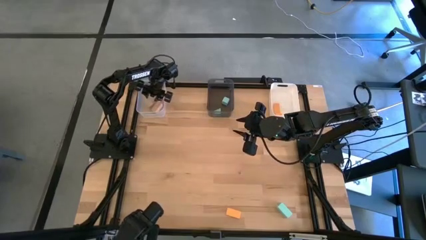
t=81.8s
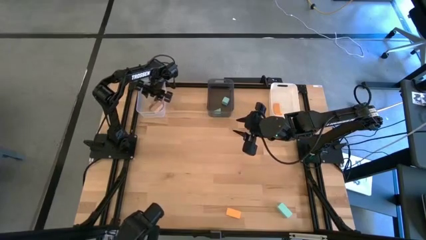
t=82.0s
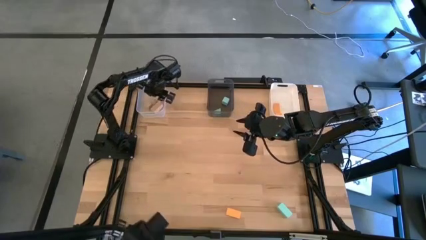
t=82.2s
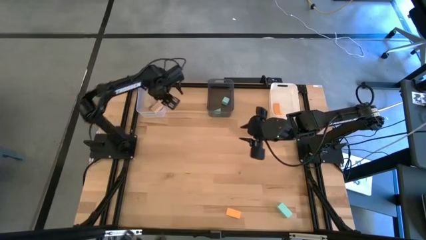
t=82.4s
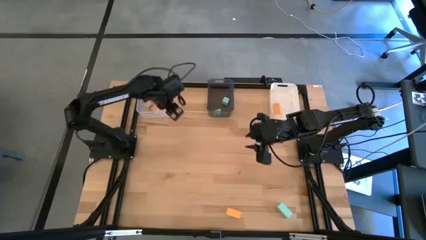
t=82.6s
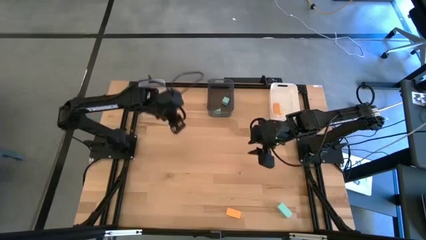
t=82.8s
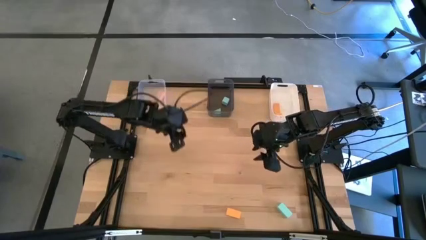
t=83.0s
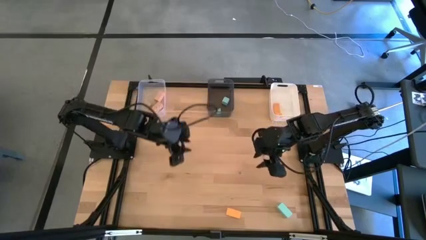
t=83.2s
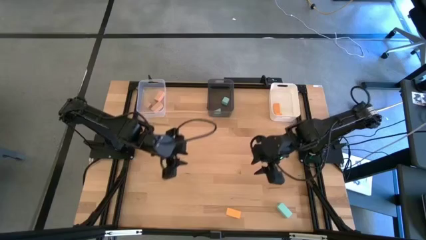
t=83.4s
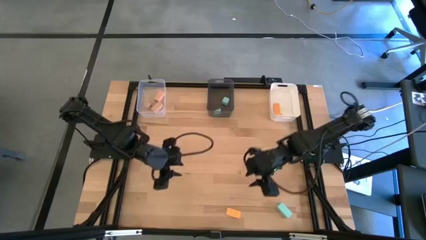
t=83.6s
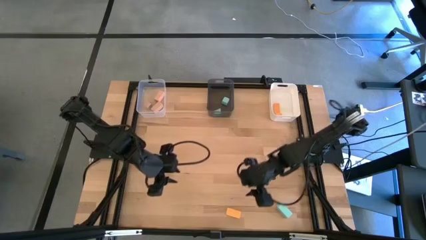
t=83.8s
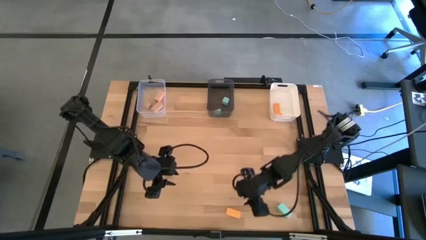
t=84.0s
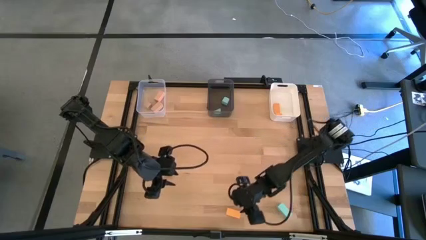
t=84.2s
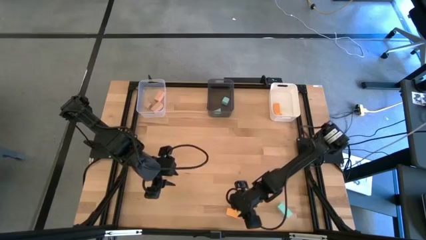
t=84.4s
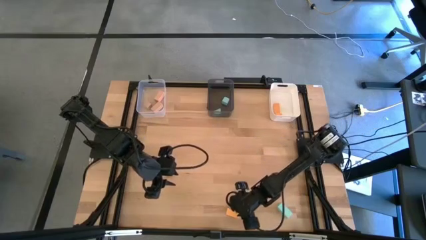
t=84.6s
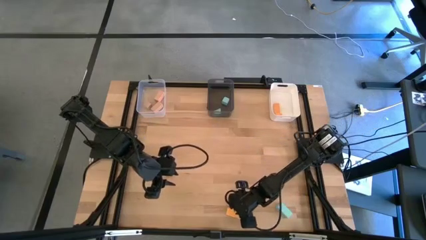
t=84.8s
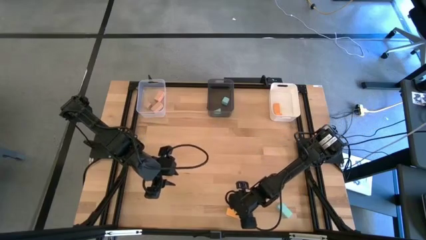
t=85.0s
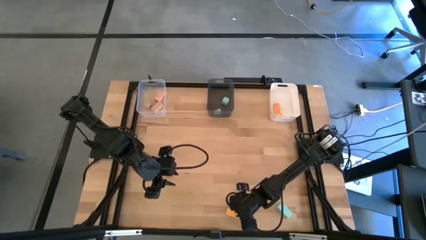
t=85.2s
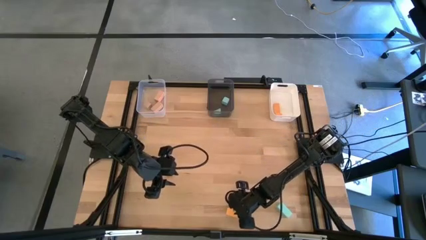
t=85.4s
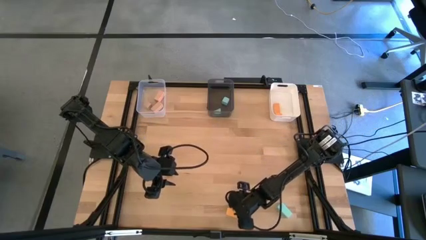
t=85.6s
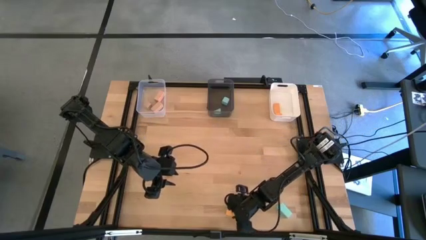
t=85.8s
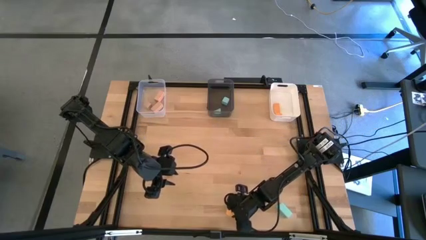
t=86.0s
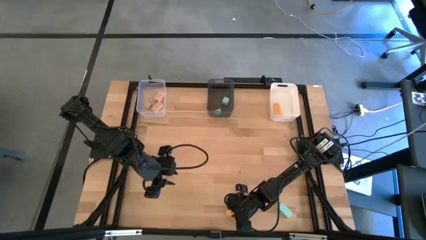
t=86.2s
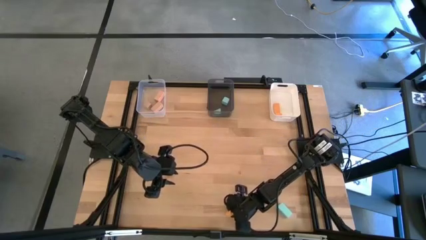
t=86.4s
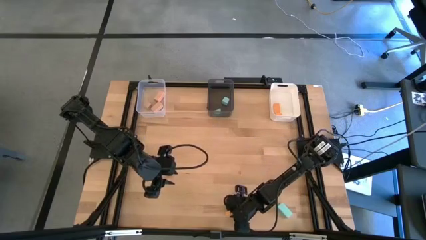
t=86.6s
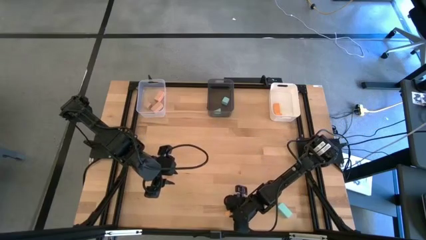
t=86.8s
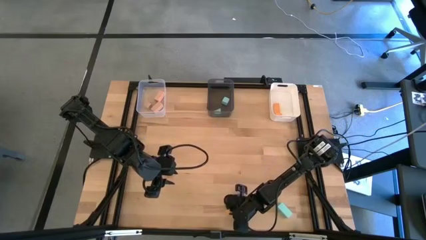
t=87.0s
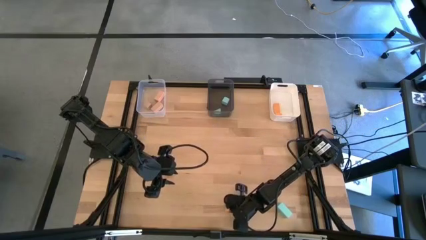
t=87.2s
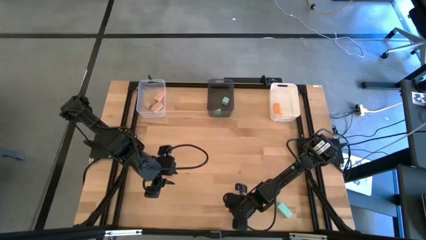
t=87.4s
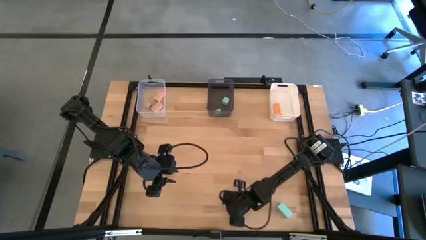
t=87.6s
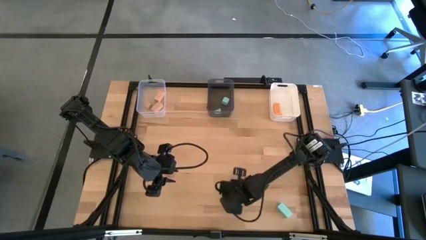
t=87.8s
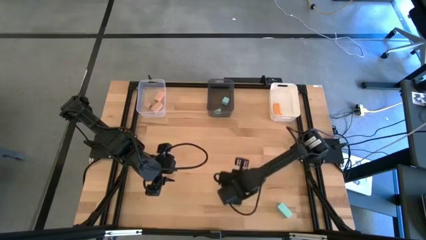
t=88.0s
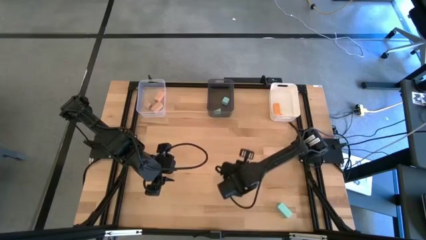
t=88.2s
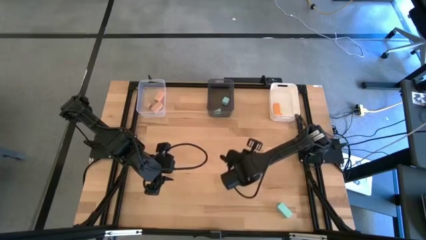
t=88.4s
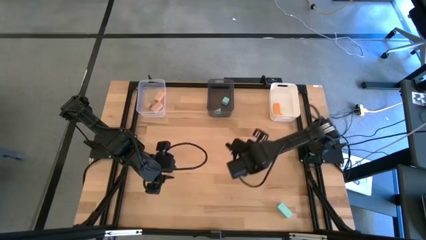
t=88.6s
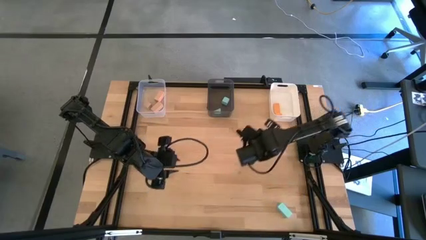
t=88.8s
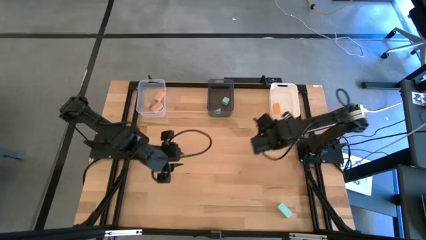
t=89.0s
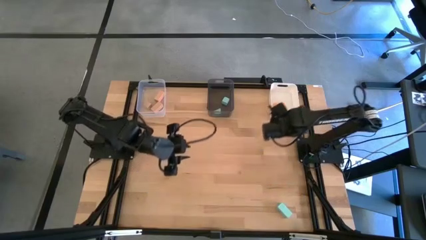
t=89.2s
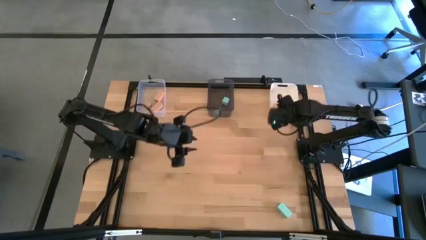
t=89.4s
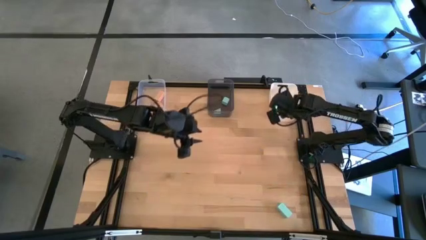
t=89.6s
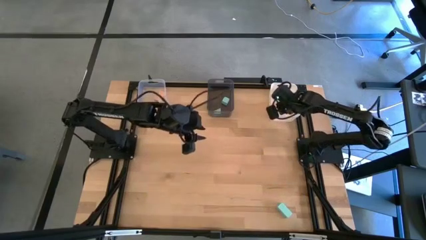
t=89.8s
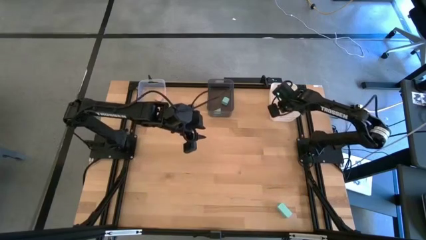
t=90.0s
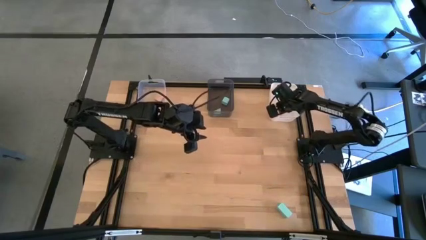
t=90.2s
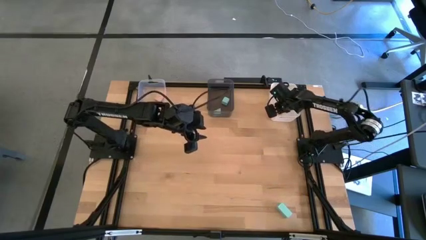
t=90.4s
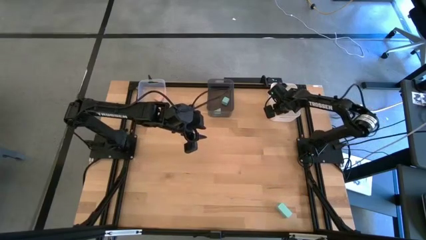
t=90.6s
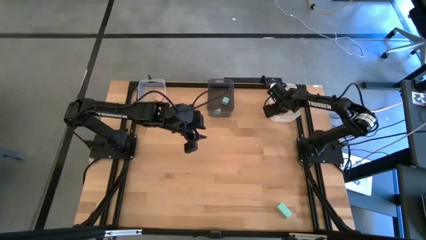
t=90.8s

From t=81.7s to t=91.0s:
Task: Sort & place blocks by color
Put the orange block into the white bin

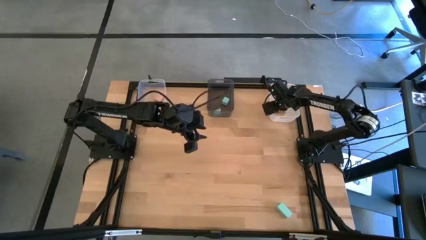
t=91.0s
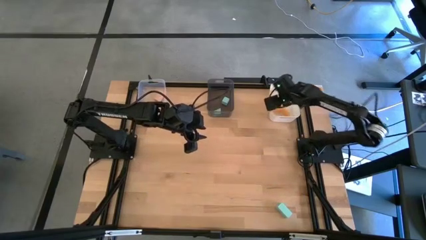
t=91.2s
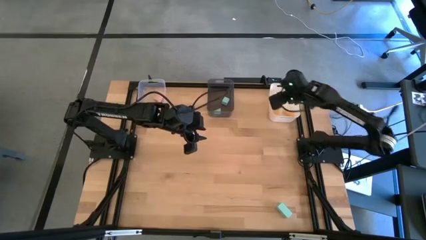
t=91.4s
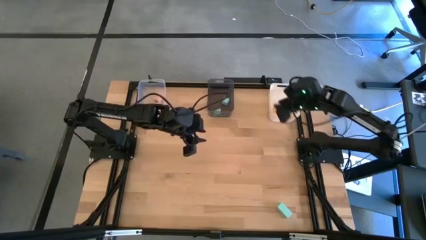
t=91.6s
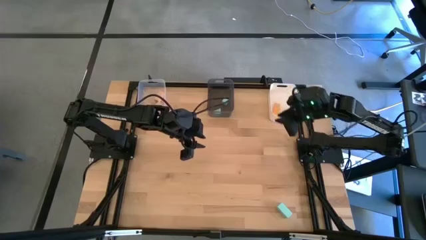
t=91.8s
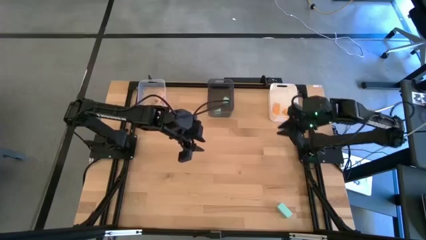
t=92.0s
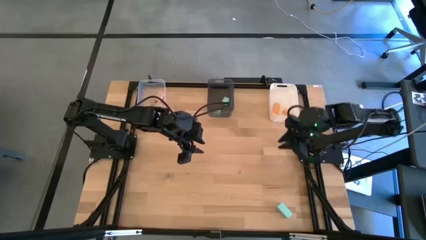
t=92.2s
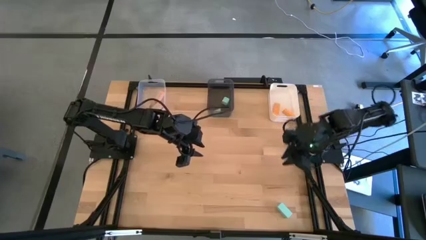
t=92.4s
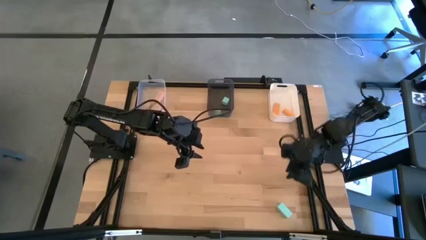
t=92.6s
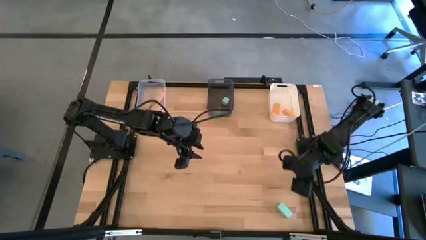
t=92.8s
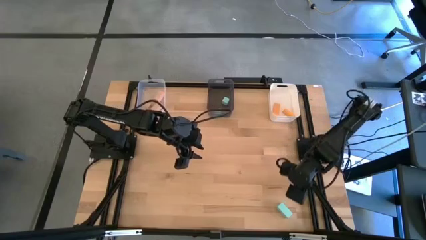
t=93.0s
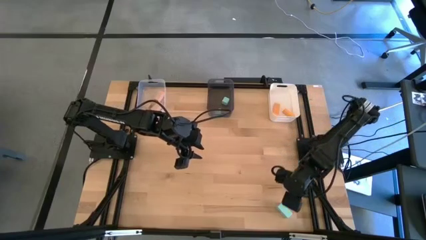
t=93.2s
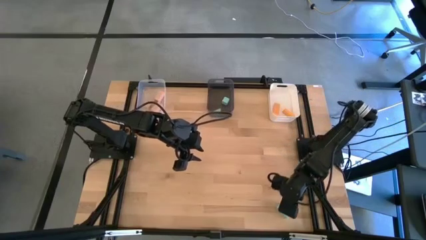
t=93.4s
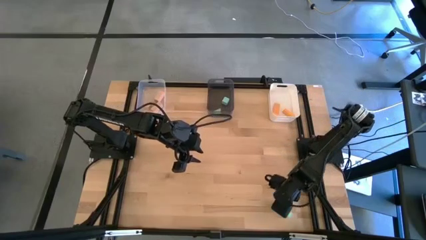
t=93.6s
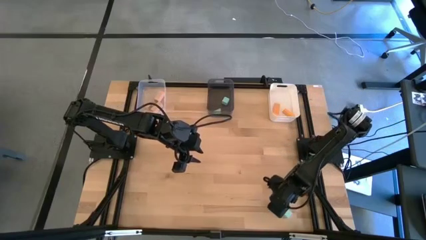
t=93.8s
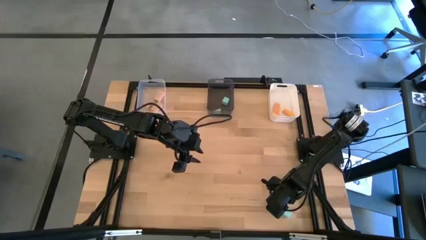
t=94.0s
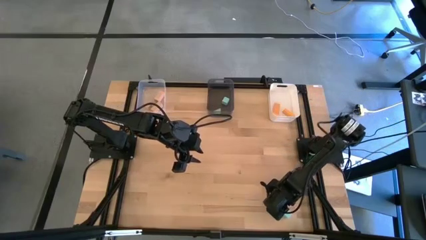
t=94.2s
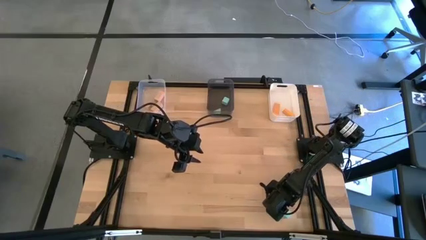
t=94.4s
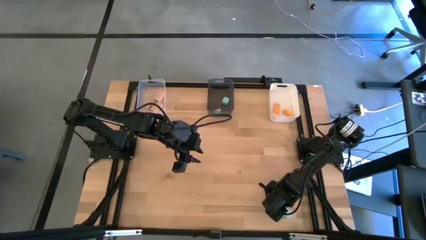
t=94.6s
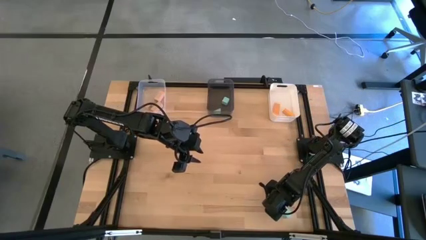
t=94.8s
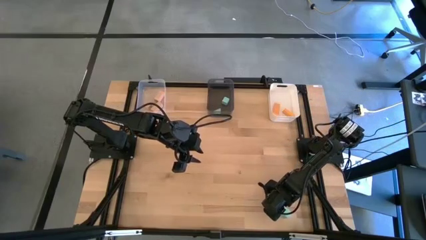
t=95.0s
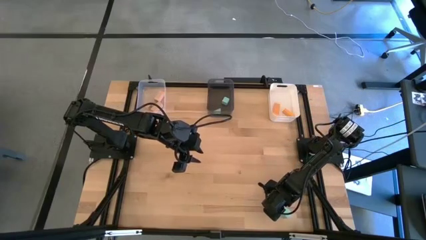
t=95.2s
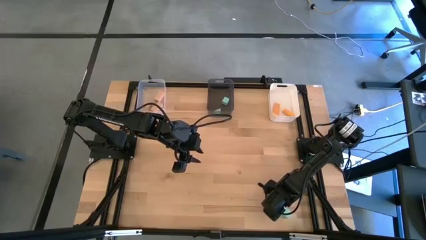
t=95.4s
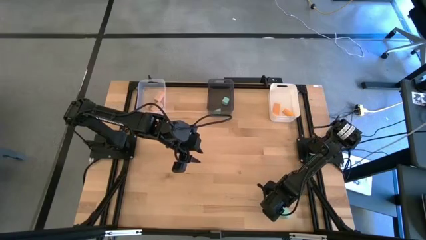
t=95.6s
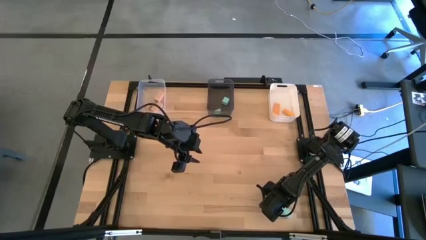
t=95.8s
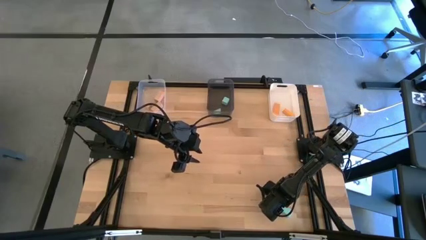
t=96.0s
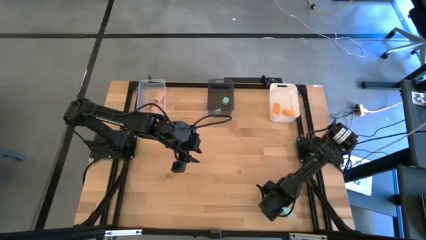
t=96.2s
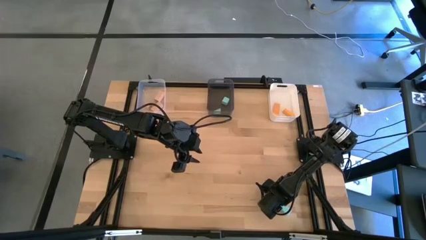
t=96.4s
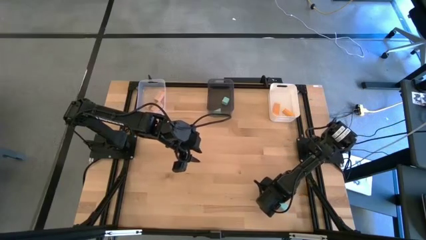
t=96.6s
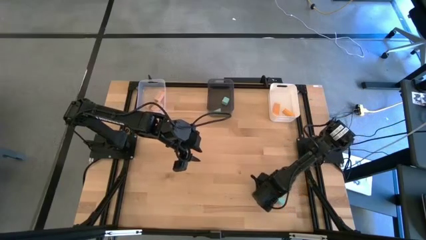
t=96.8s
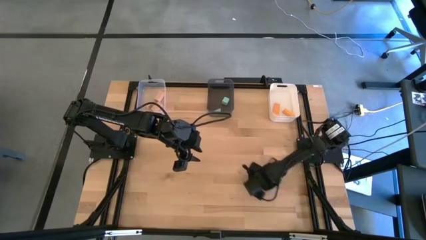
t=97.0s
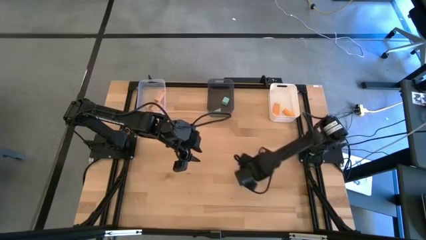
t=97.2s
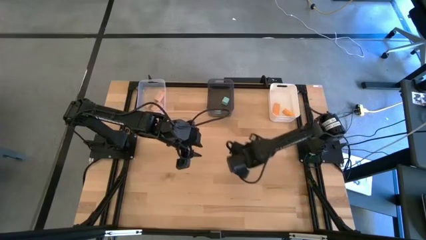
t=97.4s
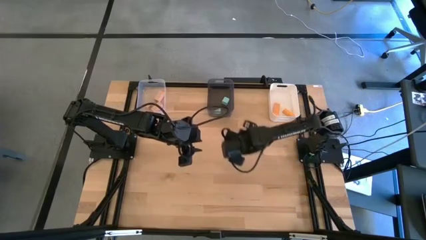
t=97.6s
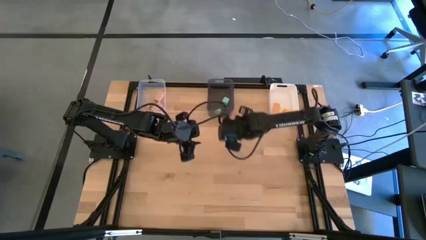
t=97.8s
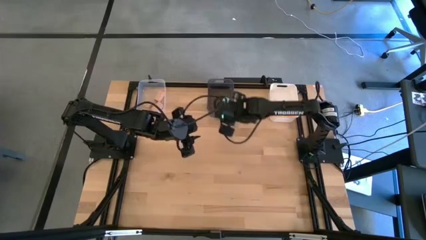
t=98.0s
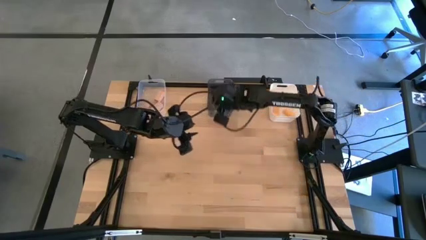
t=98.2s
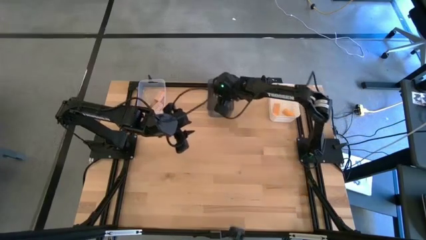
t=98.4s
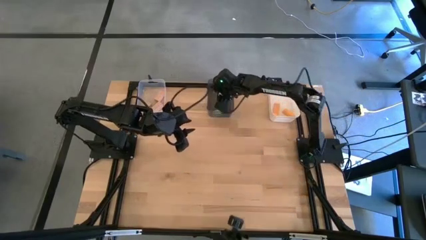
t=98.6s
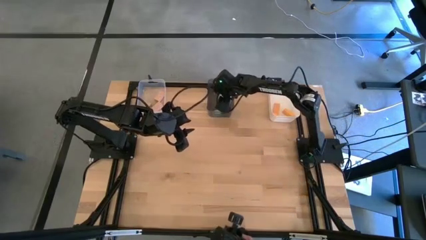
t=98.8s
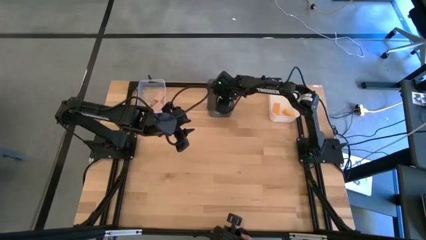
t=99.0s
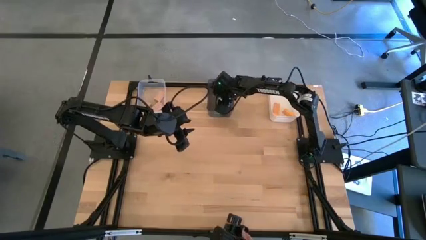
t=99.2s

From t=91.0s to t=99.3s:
Put the blue block into the black bin
